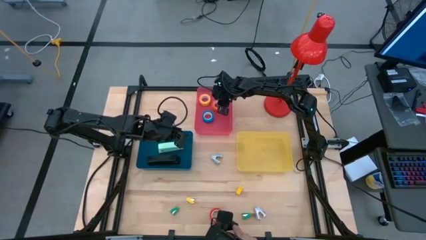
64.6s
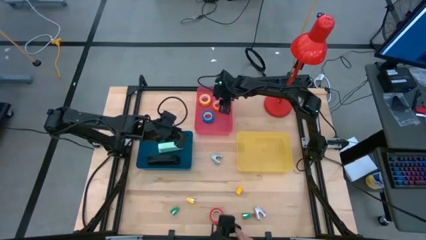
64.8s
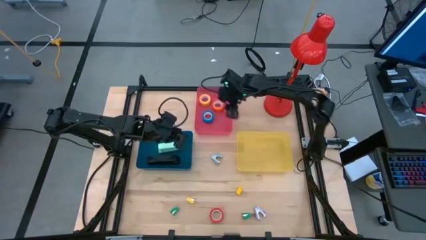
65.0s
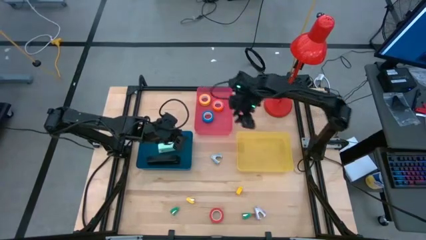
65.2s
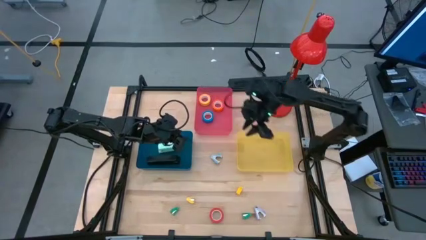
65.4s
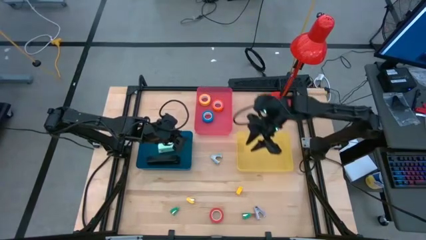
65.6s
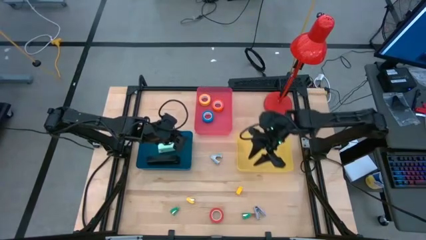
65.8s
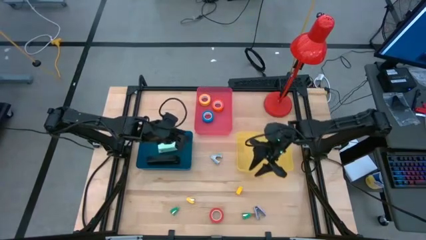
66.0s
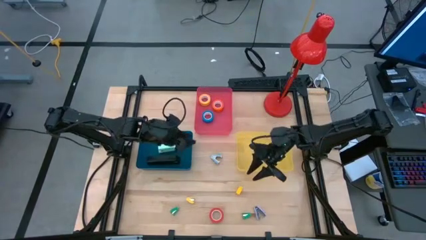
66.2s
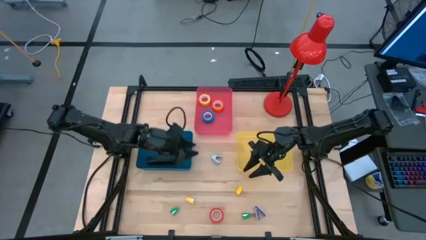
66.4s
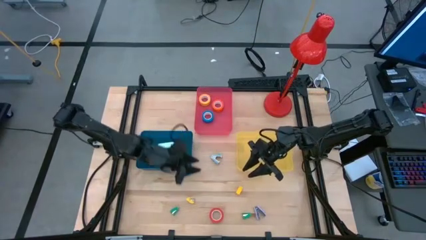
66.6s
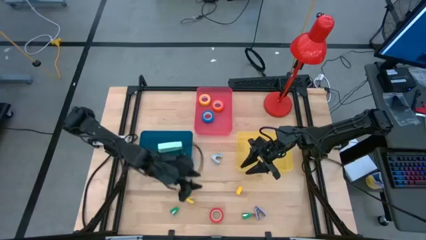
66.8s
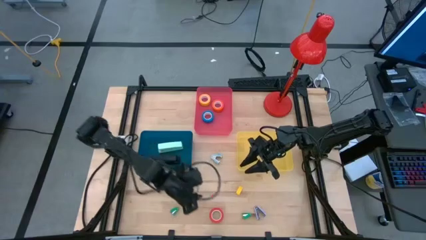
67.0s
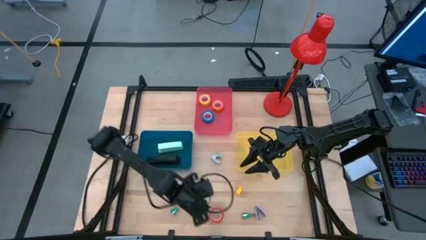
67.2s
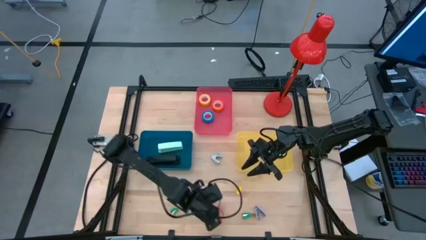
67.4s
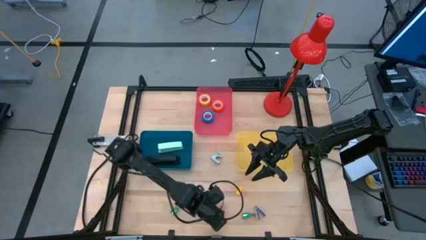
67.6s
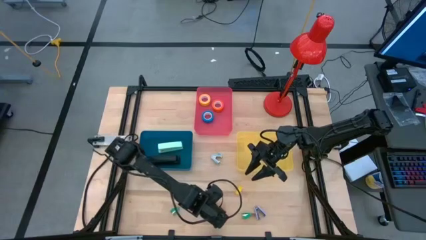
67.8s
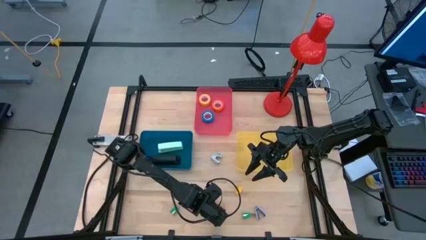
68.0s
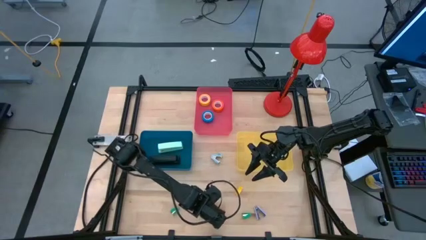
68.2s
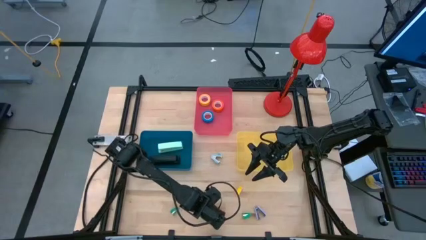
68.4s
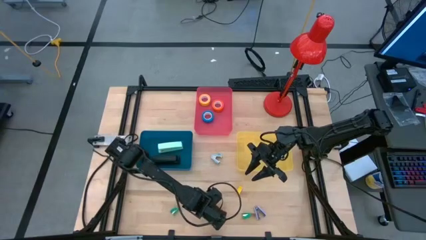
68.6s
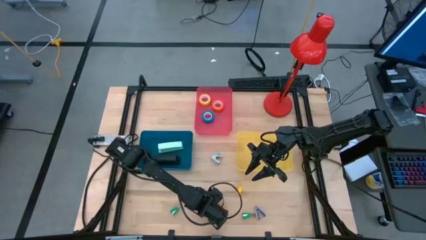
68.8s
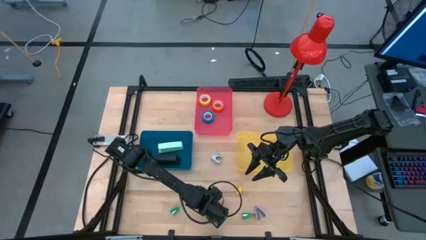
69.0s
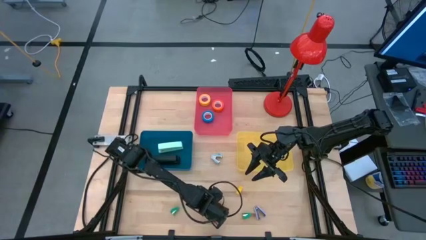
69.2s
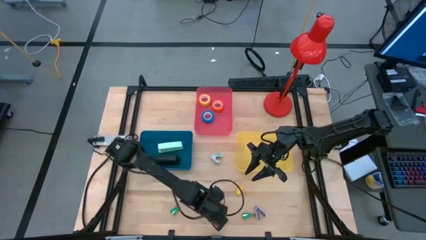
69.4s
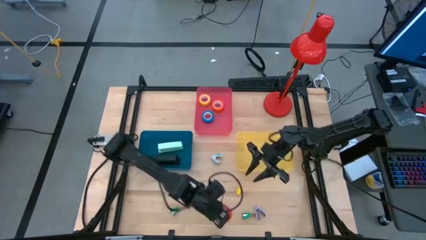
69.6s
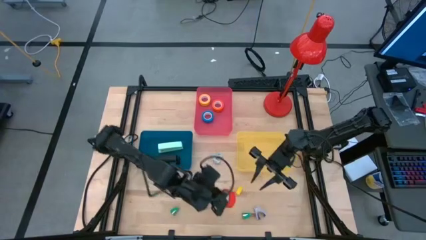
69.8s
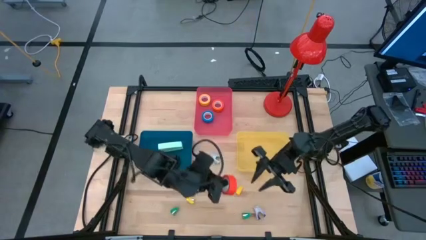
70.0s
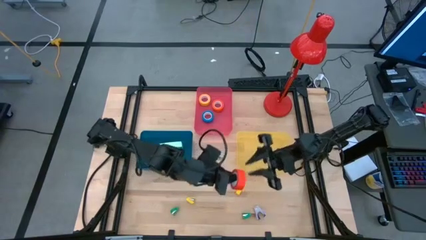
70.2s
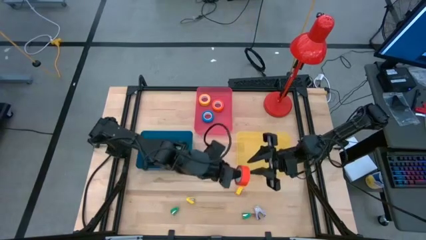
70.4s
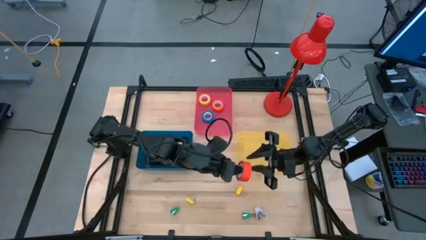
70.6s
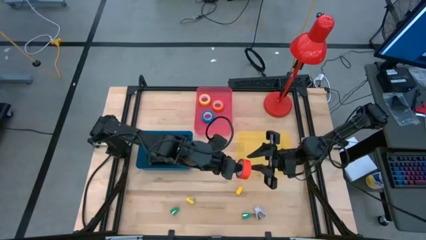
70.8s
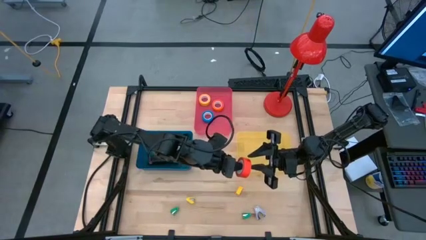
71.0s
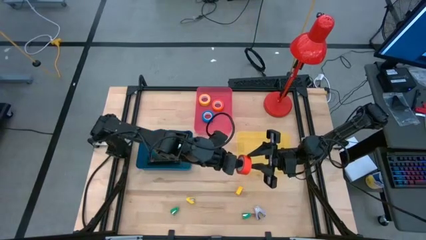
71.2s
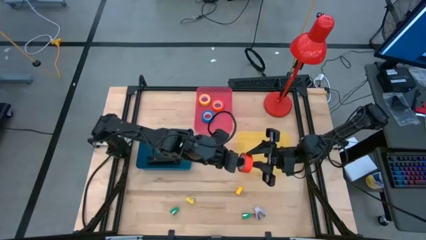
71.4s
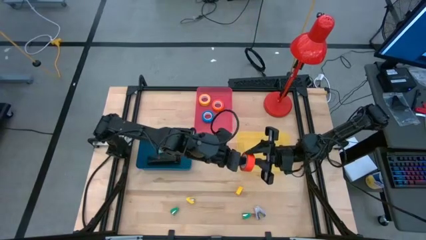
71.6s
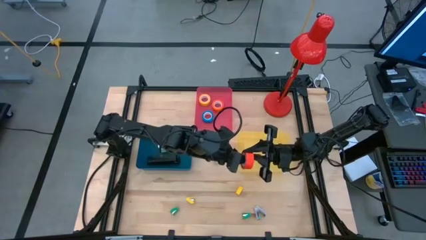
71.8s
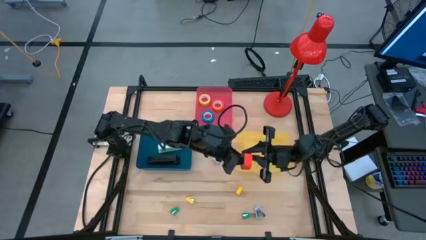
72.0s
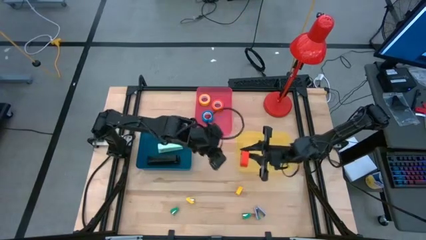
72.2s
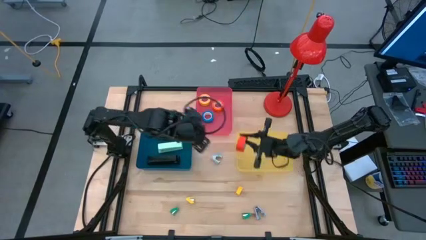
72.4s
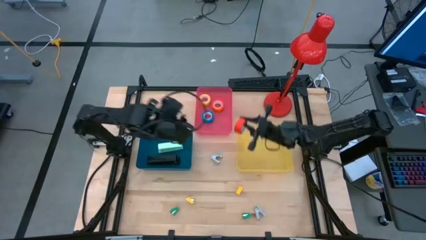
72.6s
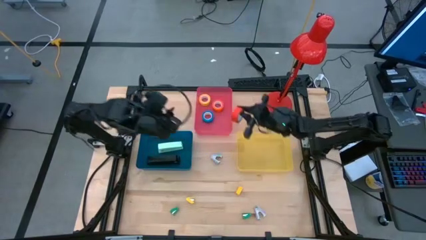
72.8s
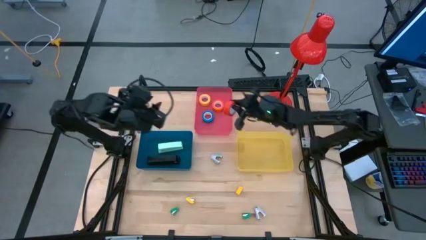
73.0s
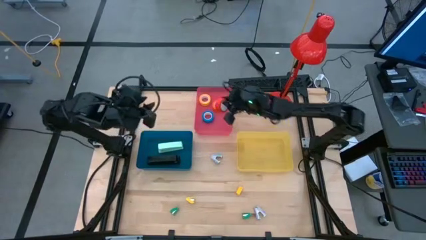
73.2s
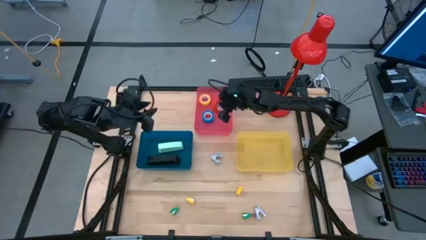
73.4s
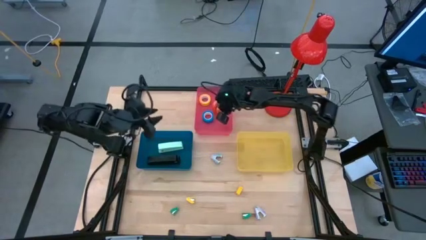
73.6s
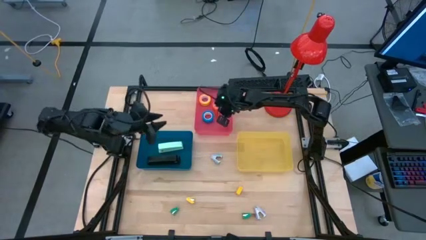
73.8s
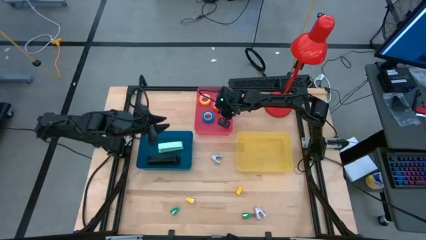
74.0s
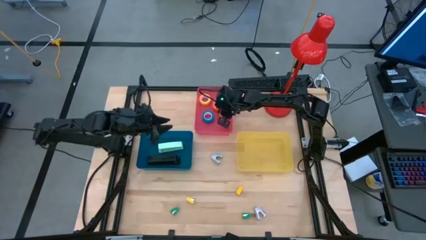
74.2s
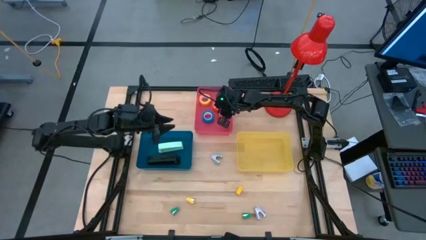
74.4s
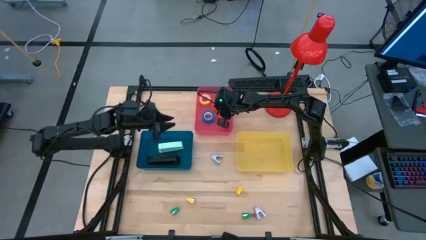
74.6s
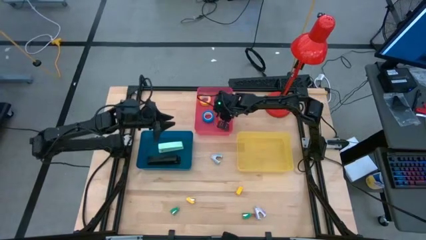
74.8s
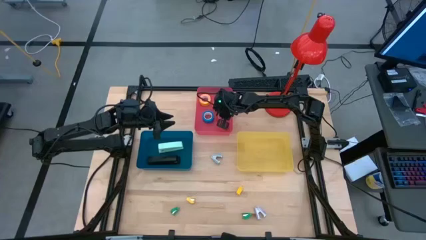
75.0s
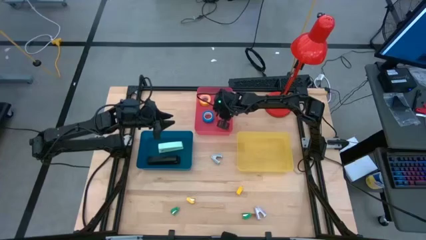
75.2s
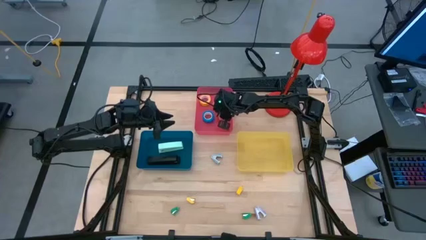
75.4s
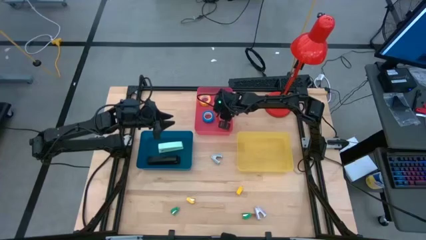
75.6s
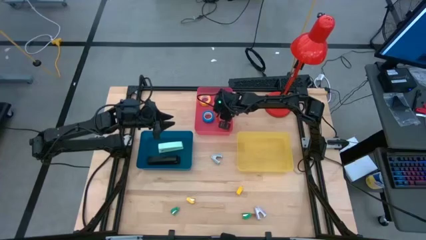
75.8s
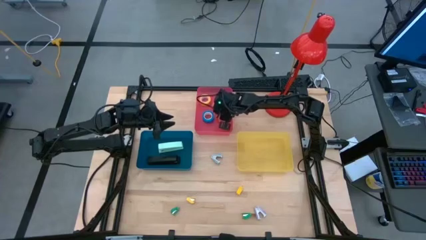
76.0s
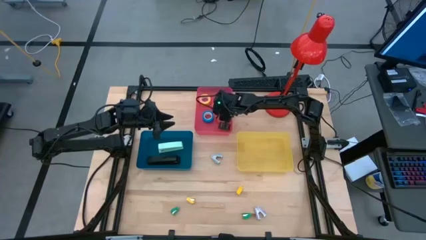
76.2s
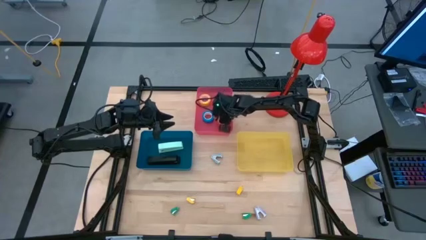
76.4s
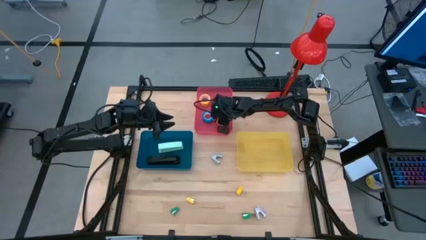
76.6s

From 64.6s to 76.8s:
Task: Pick and place Stapler, Stapler remover, tape
Put the red tape into the pink bin
